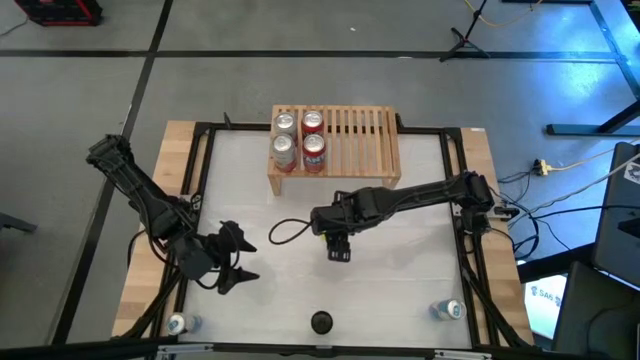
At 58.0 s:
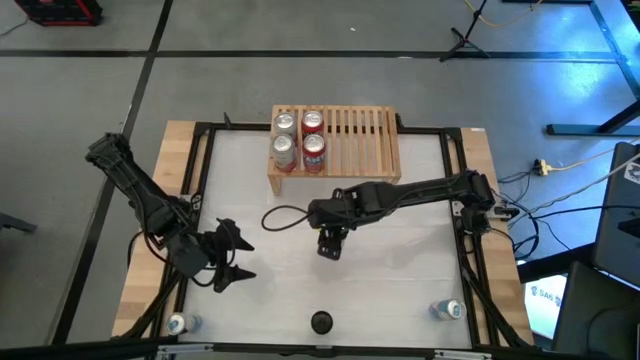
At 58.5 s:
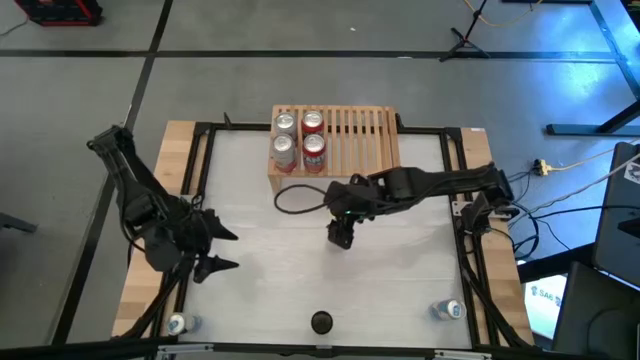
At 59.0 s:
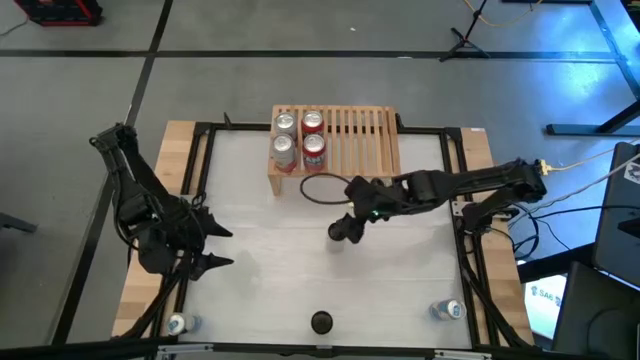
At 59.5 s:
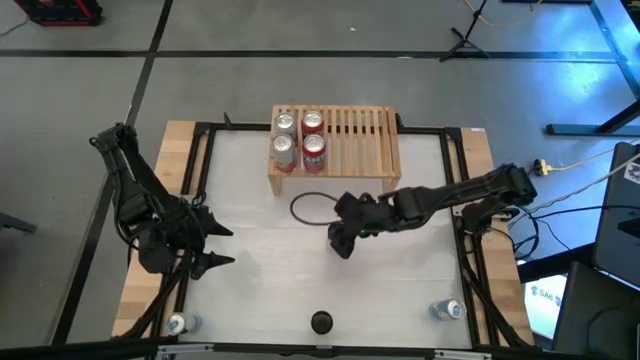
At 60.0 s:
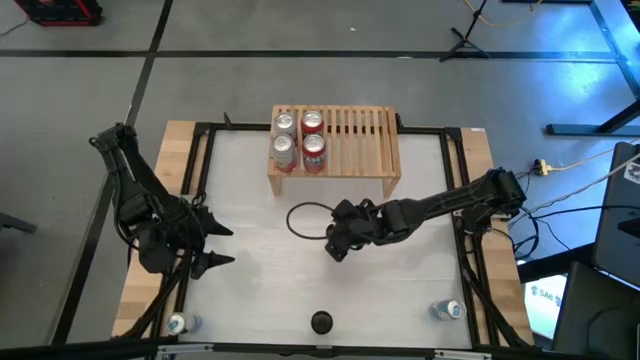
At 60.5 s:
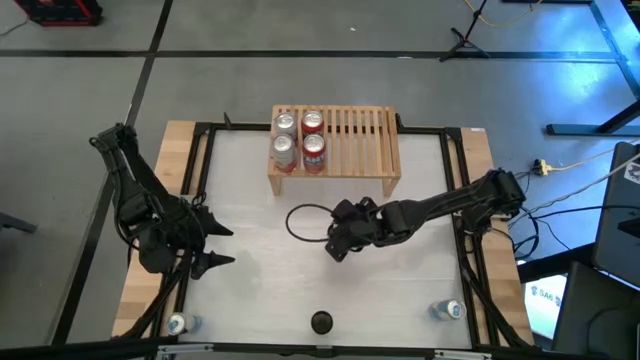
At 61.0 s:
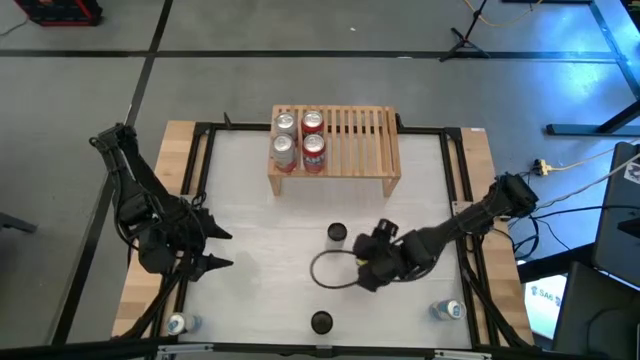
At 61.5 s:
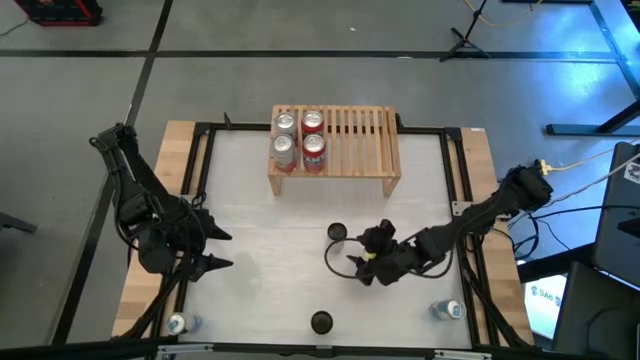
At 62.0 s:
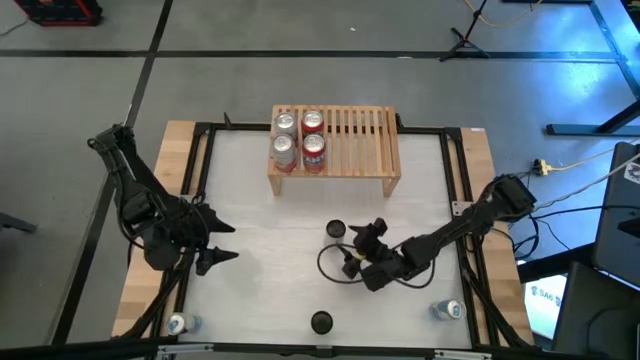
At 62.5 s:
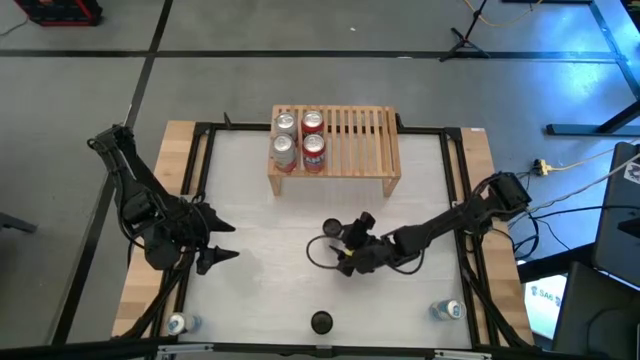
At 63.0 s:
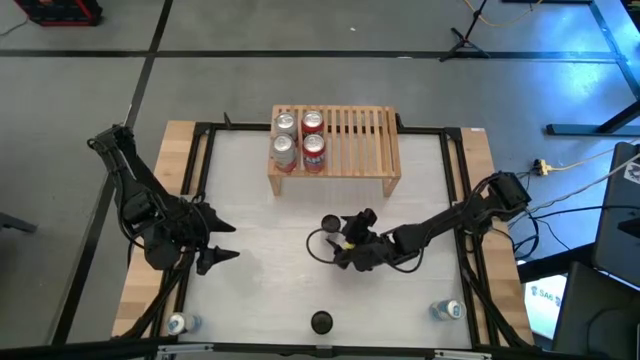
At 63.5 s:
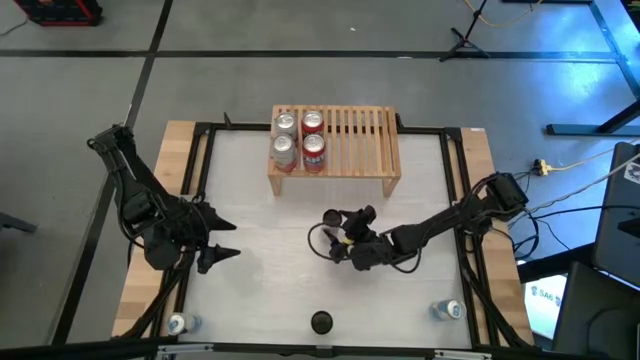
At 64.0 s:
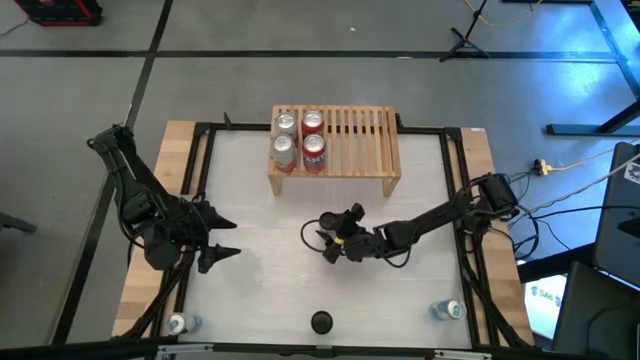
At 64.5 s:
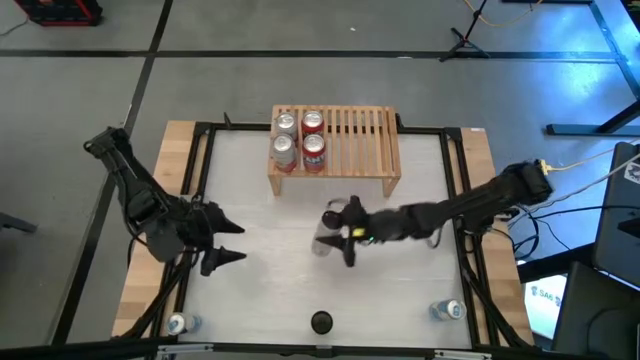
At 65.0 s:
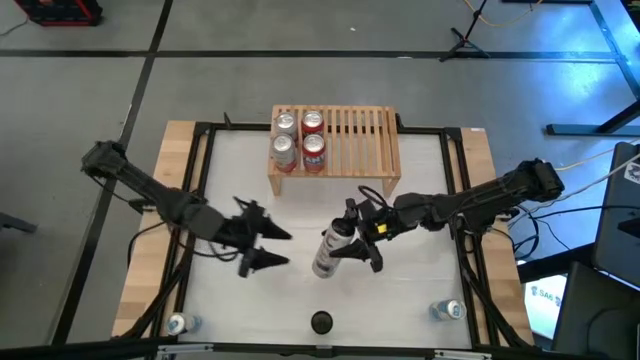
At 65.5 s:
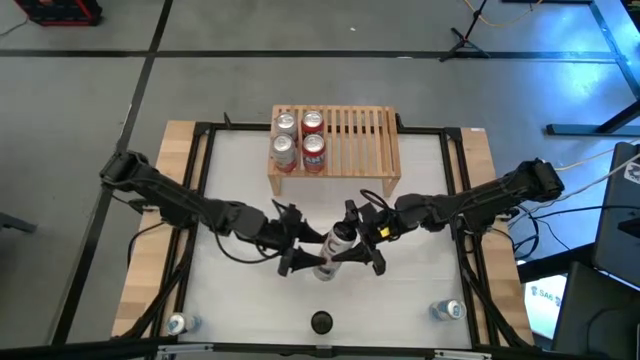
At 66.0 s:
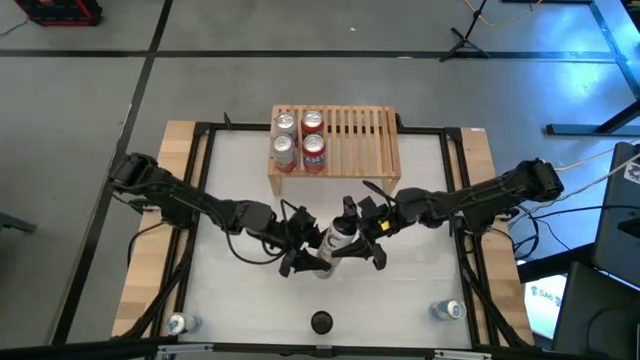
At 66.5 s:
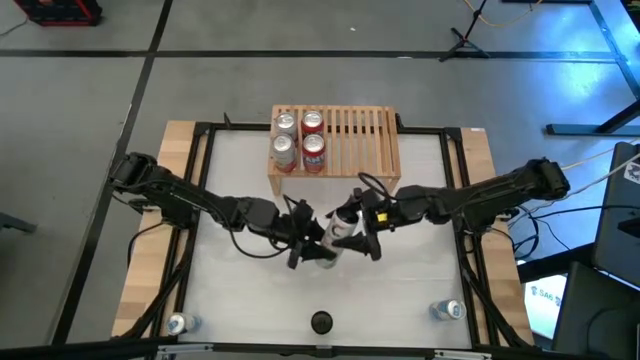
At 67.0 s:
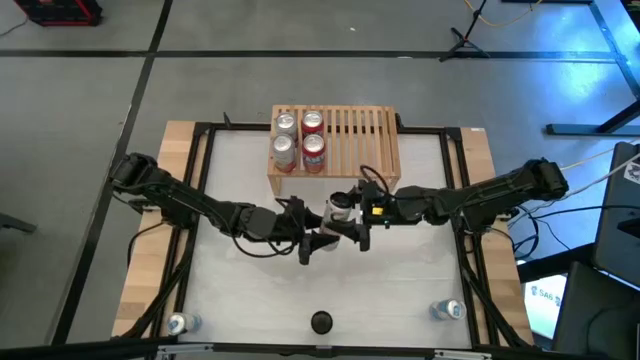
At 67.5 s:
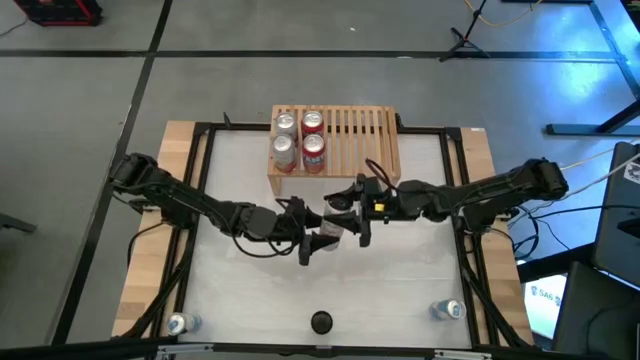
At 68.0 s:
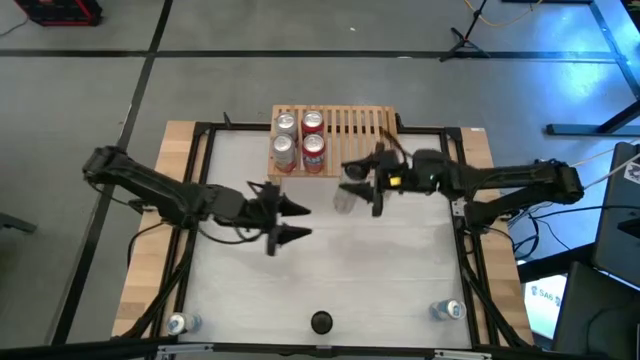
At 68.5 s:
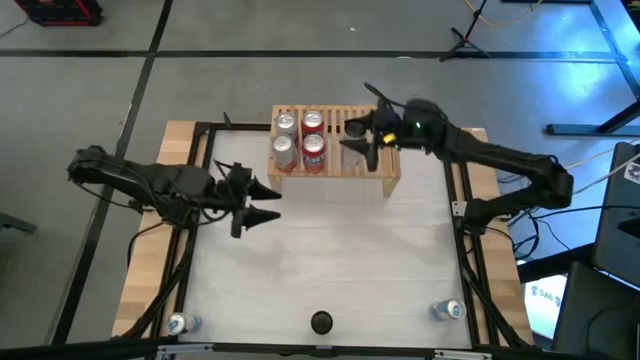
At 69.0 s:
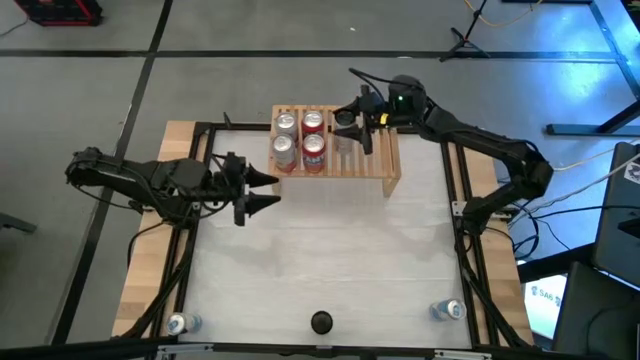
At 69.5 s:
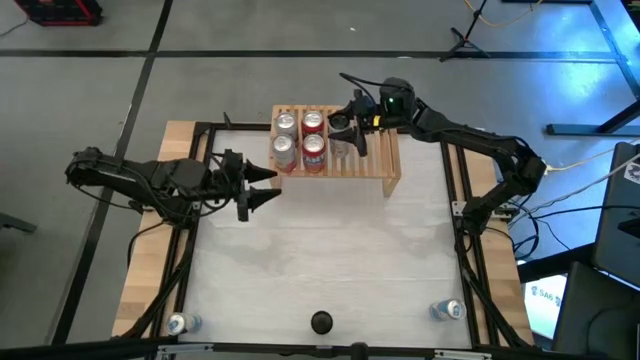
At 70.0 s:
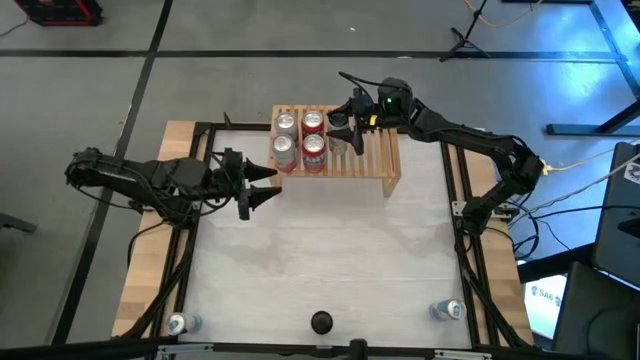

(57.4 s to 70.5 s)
Task: Place canned beverage on shelf
Put the top white yellow soda can on the shelf

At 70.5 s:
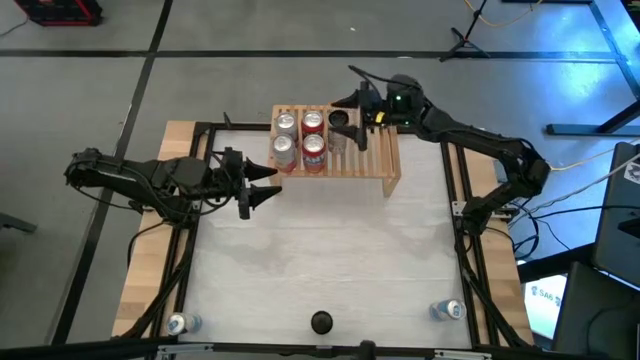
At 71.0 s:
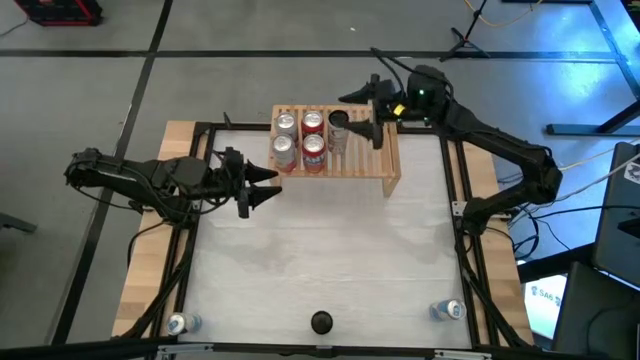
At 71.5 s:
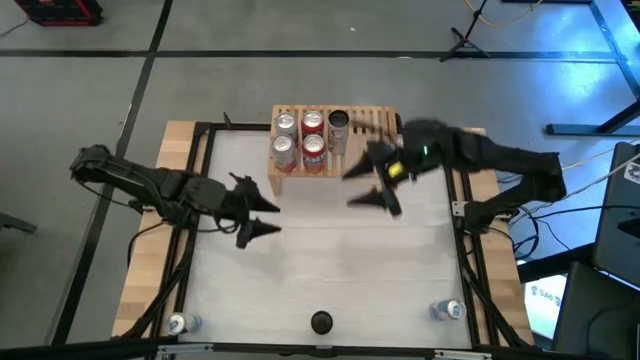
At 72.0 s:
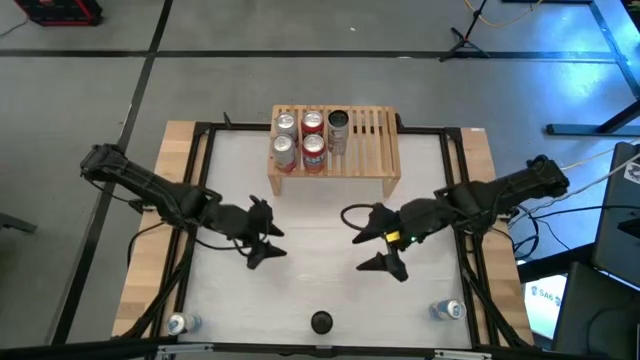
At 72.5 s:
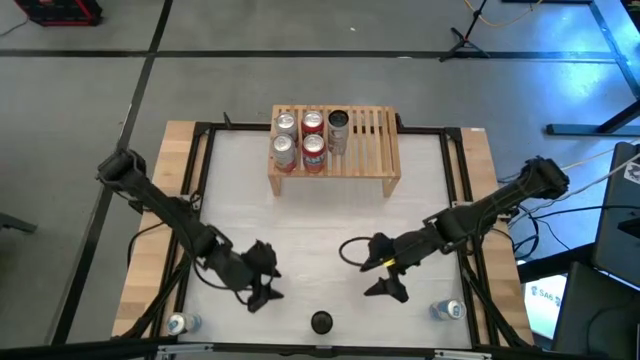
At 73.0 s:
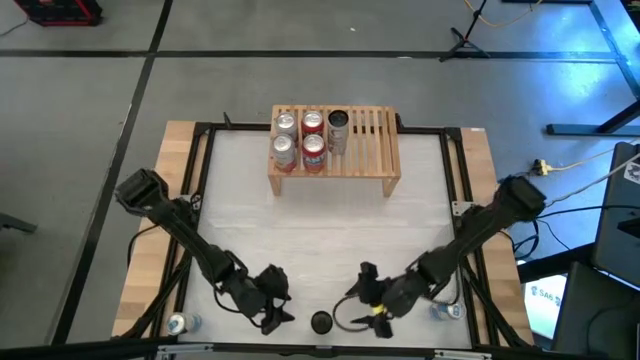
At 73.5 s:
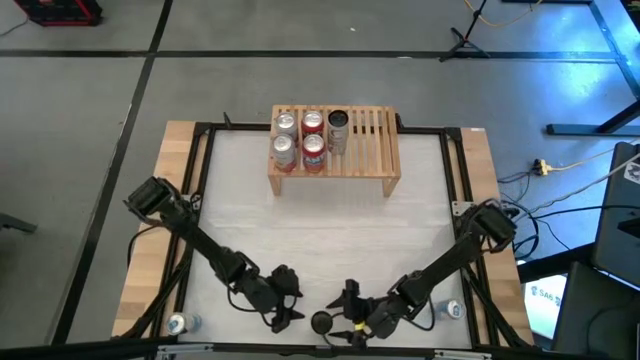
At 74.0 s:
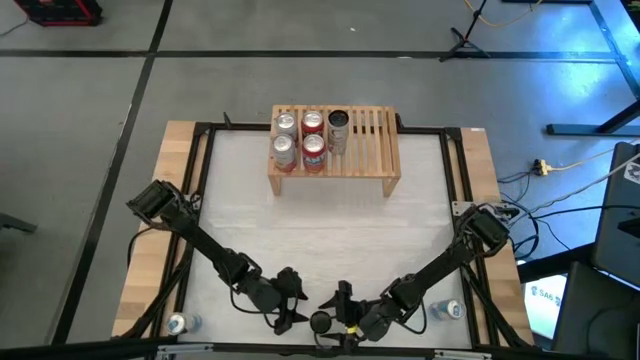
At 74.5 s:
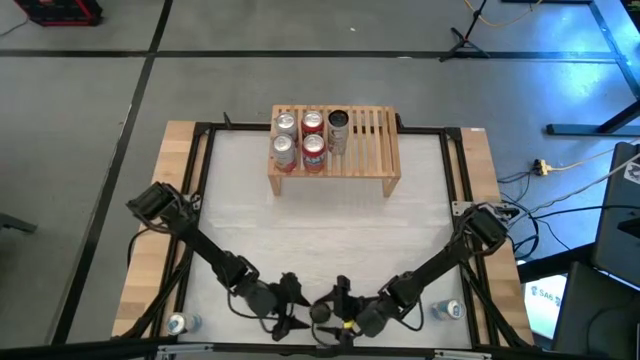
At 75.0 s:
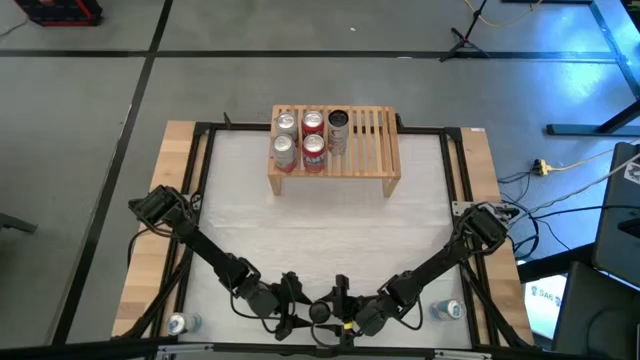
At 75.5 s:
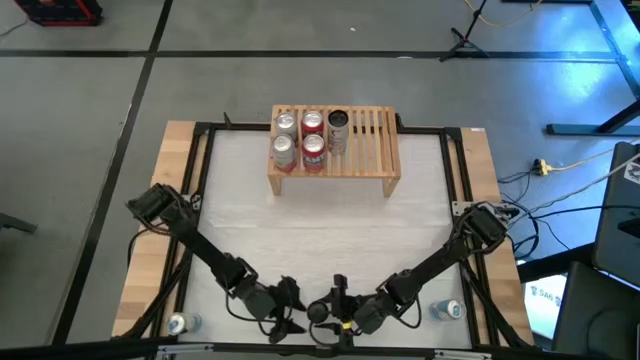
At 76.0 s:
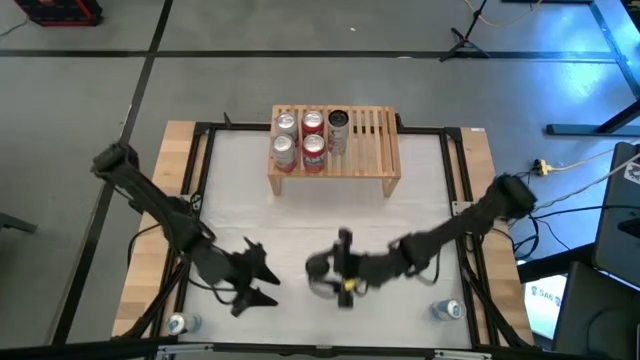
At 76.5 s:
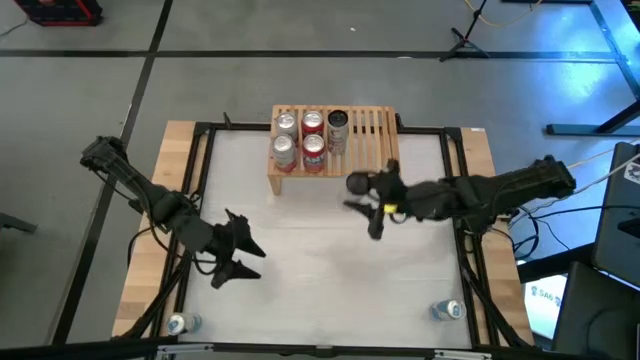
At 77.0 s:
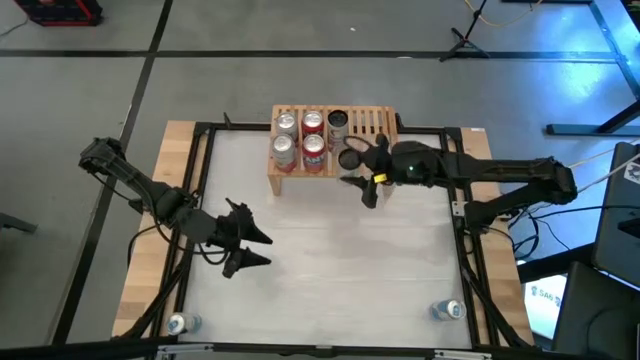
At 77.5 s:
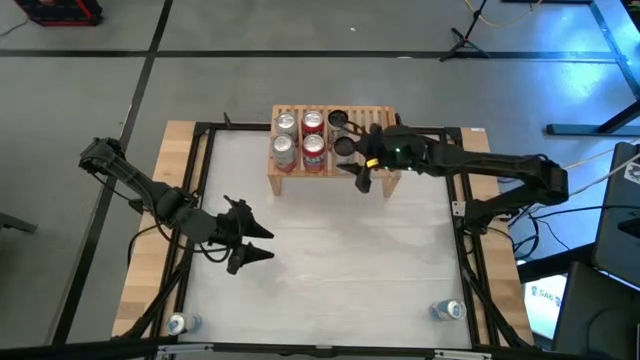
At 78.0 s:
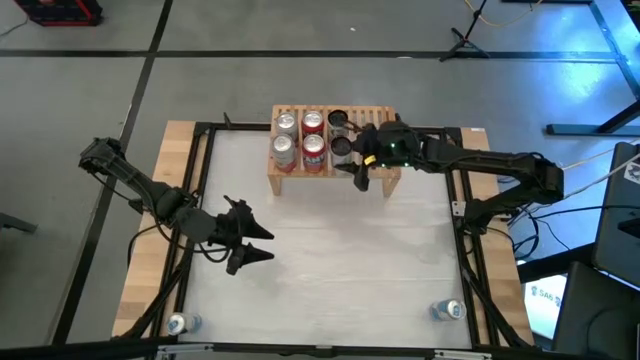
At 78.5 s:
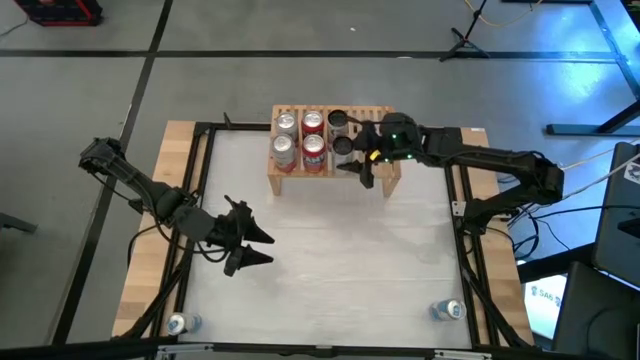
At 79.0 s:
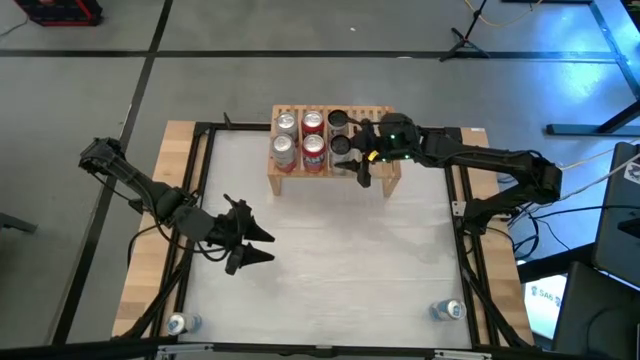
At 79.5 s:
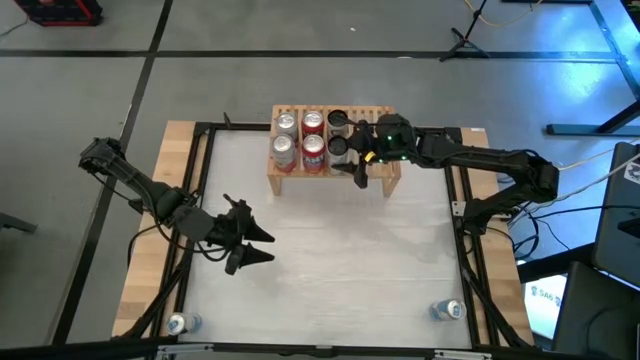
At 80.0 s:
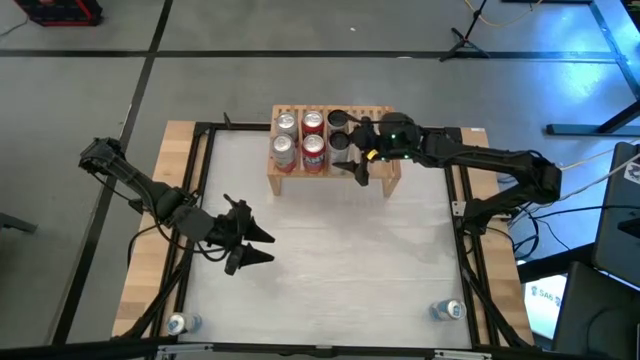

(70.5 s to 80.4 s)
Put the white yellow soda can on the shelf aligned with the other white yellow soda can
